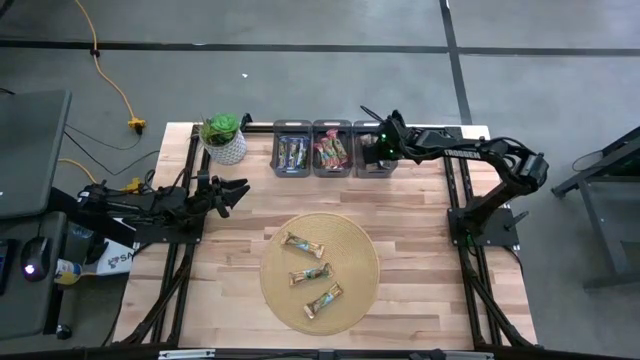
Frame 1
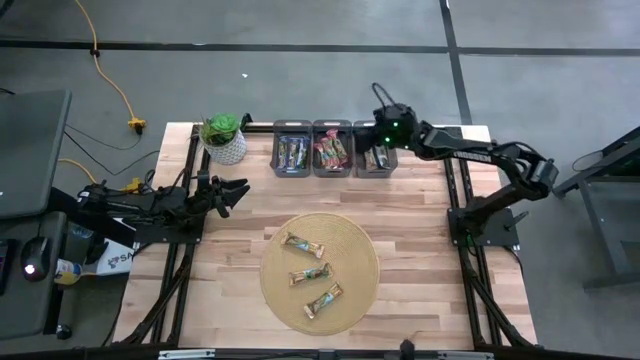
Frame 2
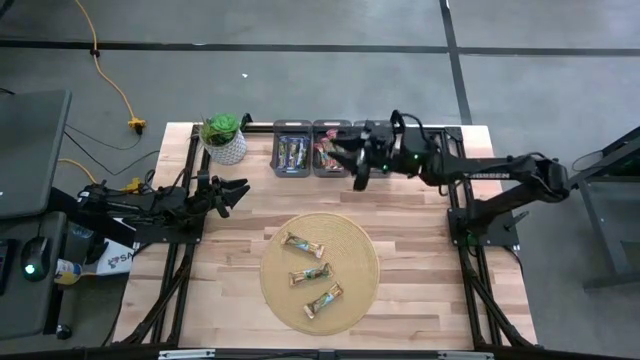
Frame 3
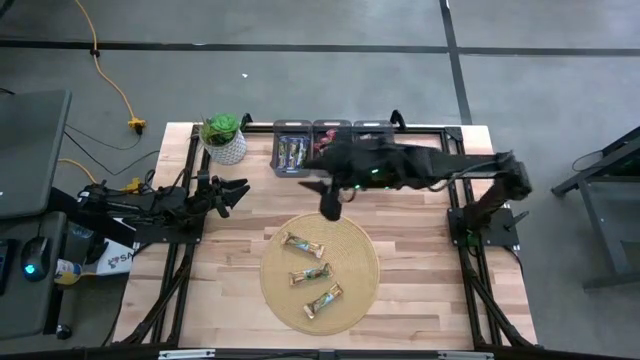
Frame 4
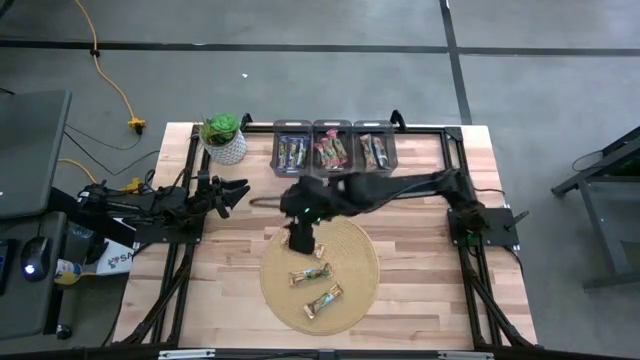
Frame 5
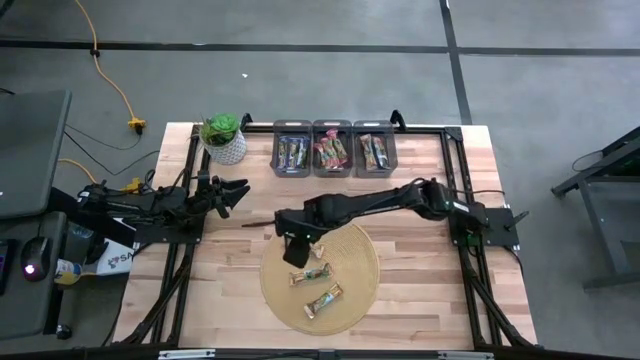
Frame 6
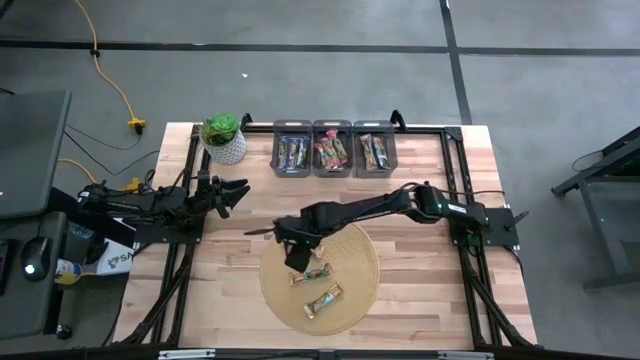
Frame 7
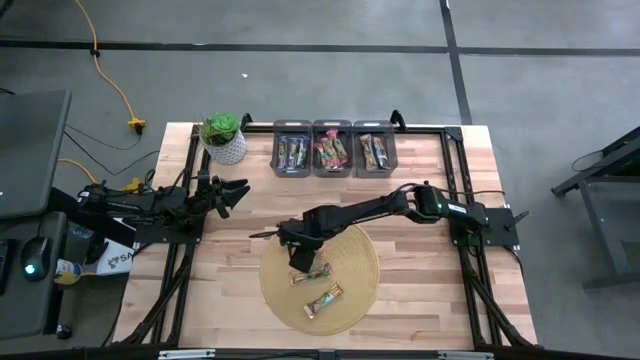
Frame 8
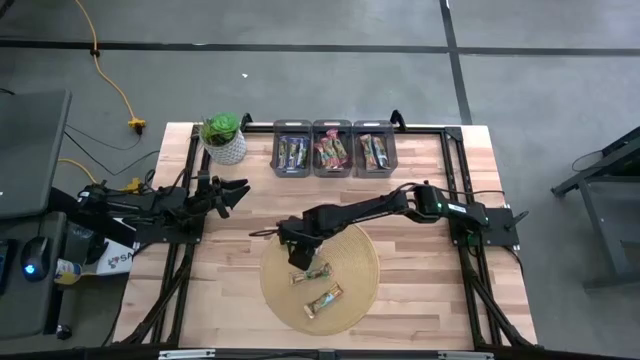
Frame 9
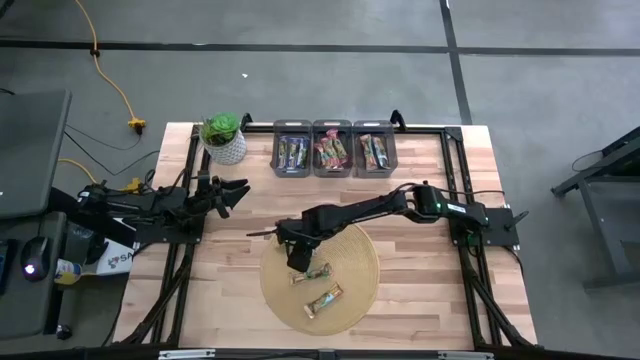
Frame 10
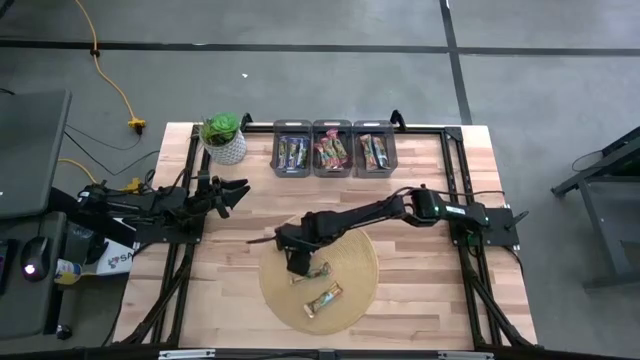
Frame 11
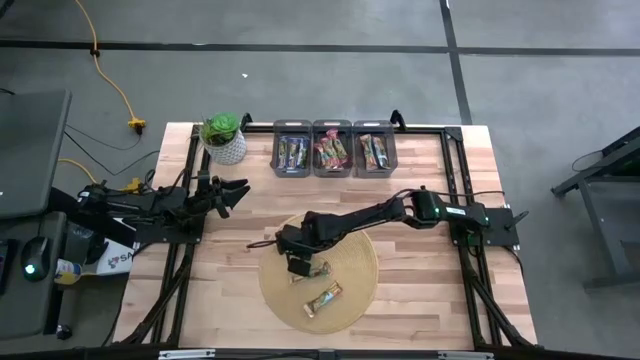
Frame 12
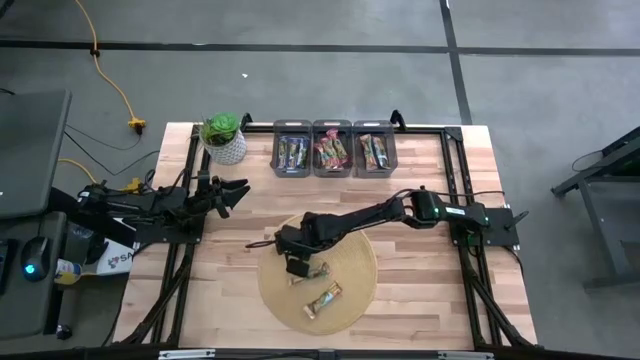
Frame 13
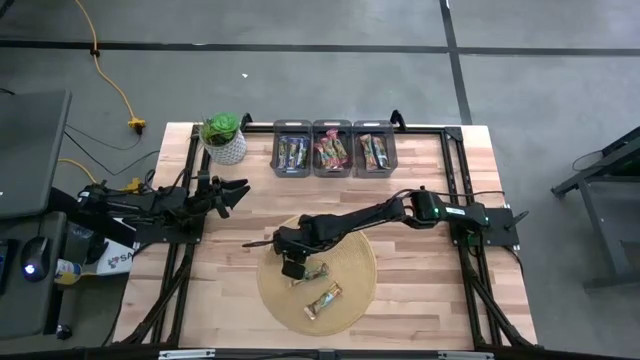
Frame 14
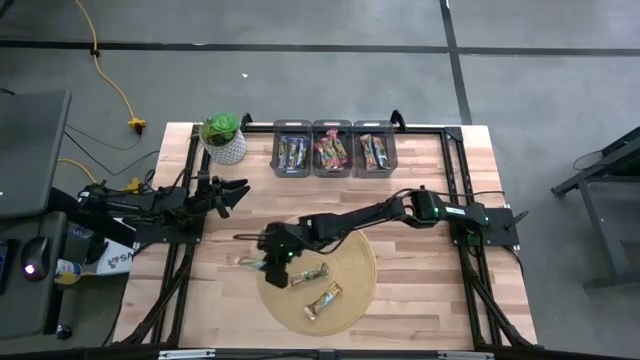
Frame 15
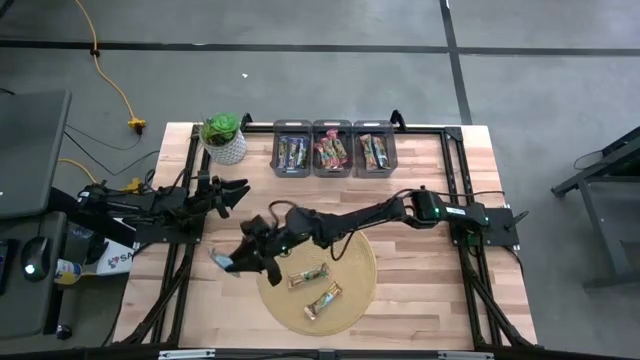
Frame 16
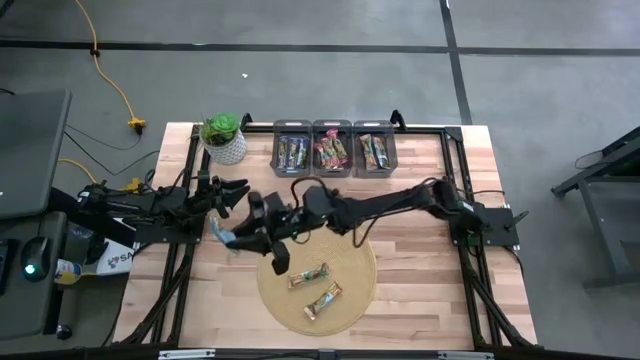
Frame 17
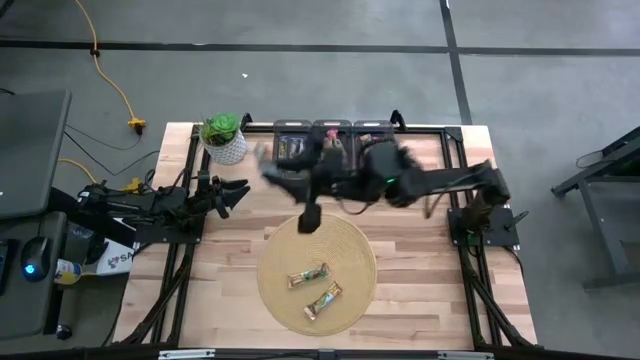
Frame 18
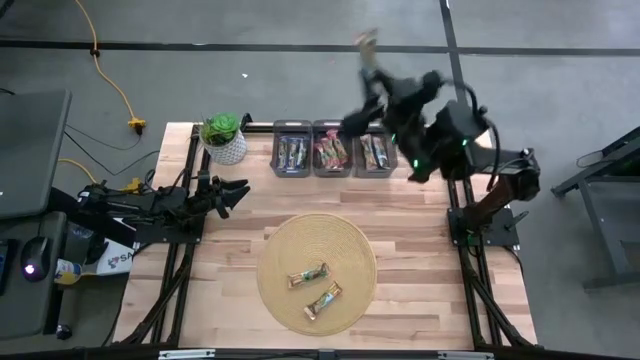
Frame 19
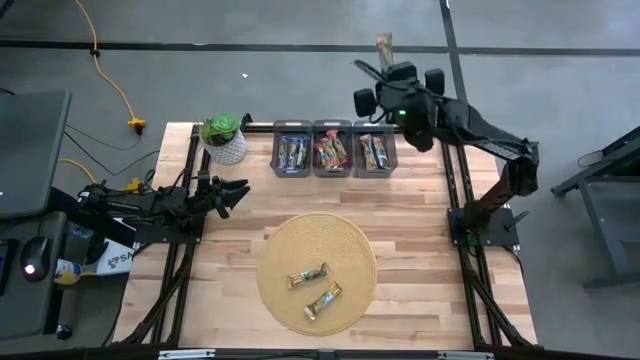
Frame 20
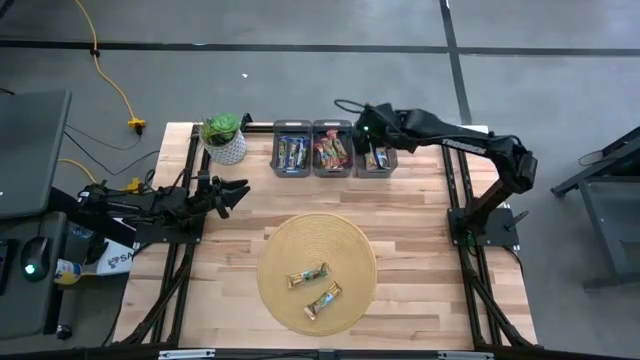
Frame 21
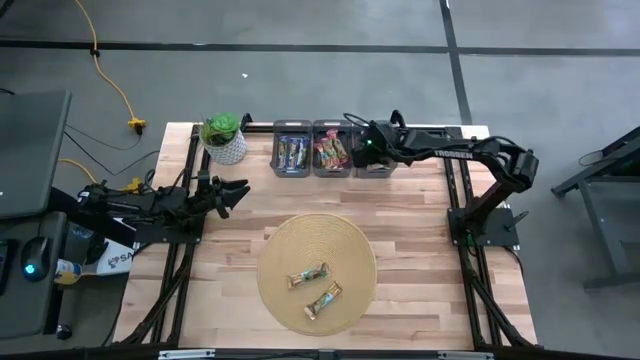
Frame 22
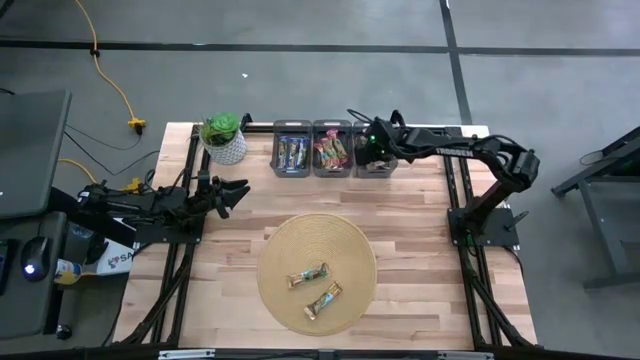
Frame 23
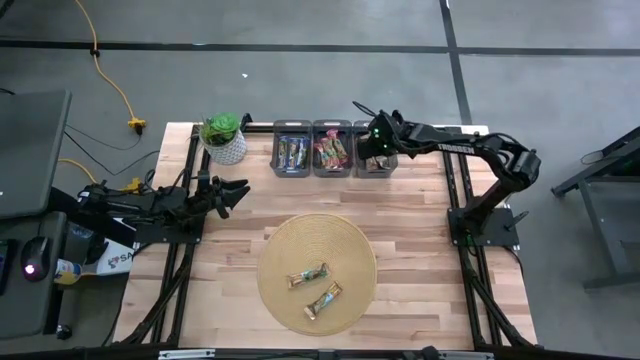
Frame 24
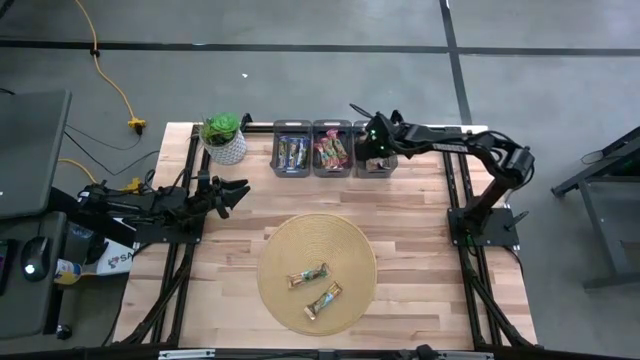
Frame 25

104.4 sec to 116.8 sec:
Task: Pick and place Granola Bars by type
Put the yellow granola bar into the right black bin

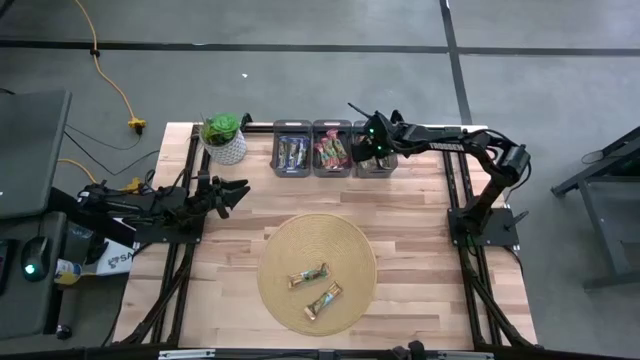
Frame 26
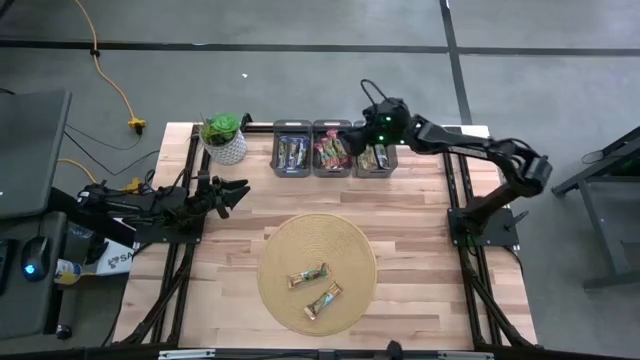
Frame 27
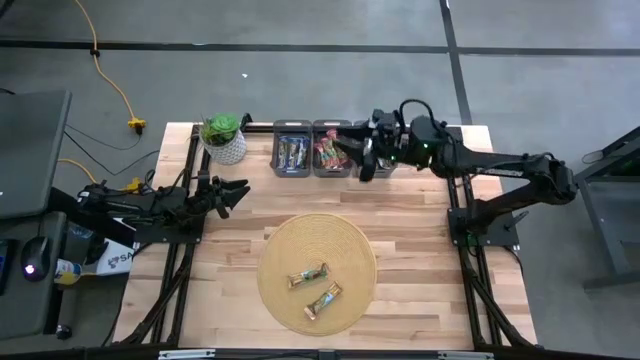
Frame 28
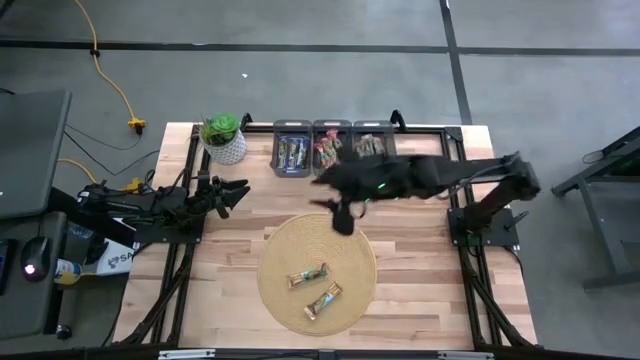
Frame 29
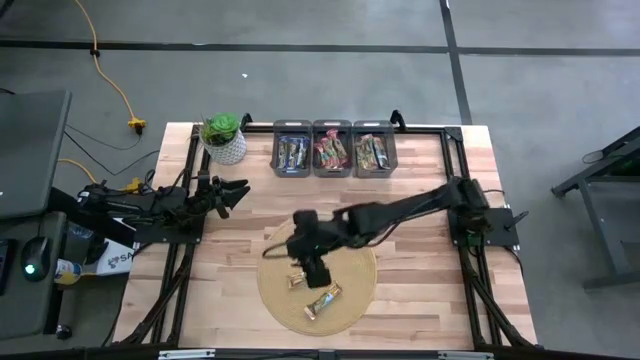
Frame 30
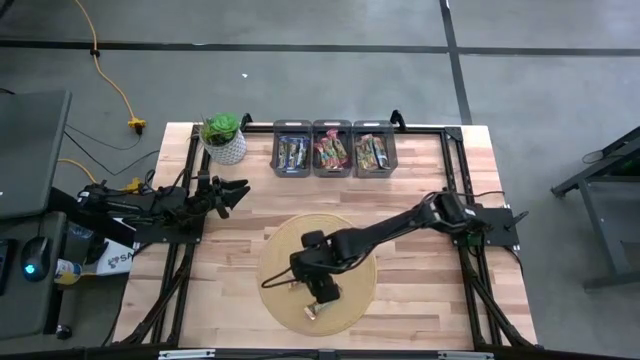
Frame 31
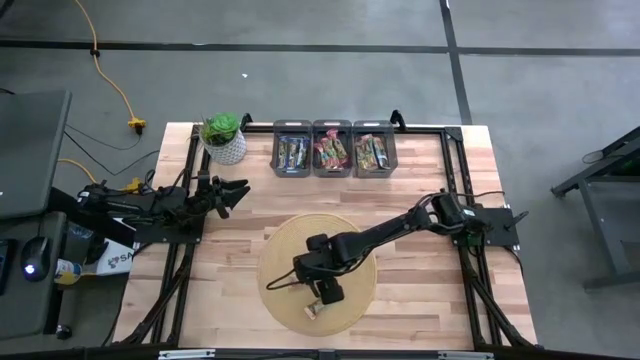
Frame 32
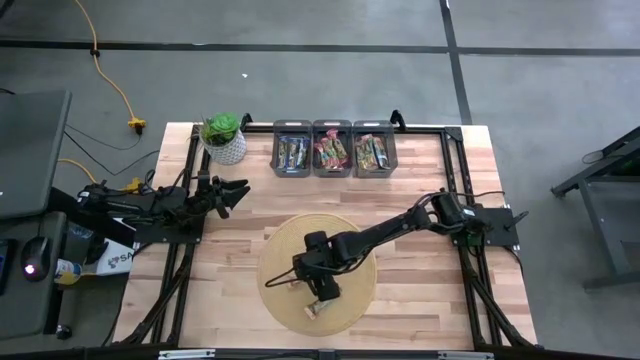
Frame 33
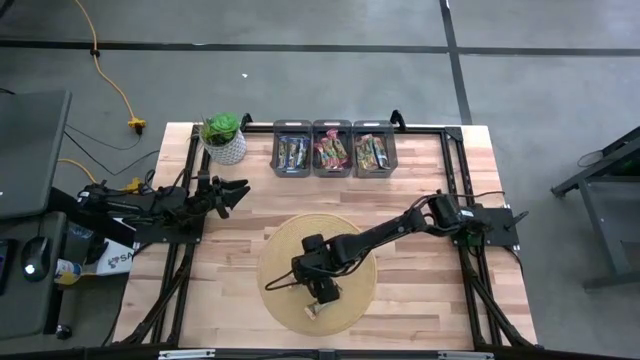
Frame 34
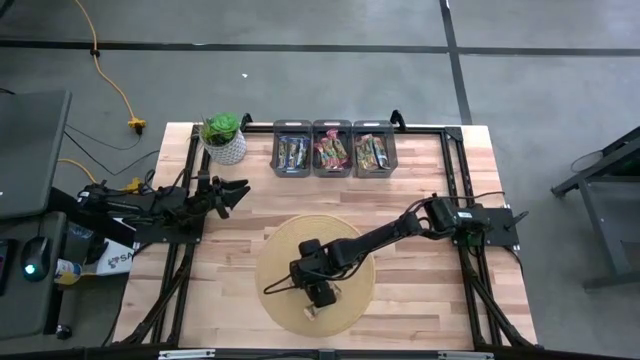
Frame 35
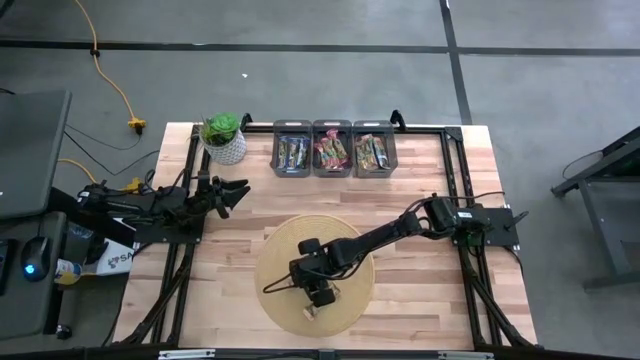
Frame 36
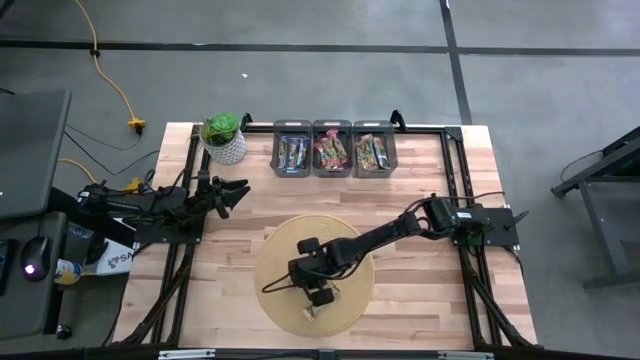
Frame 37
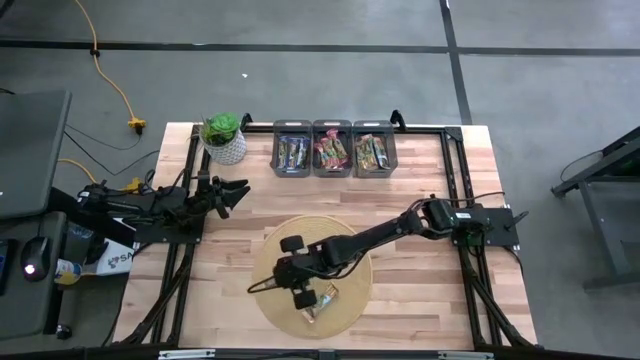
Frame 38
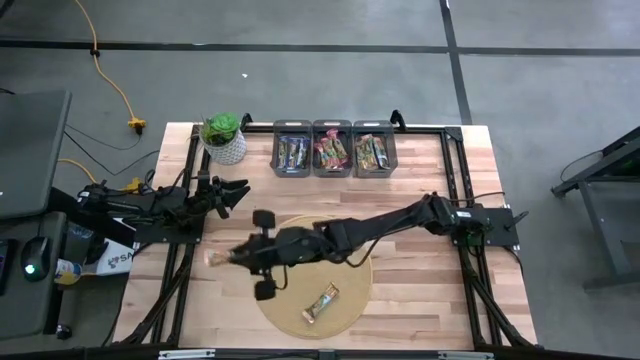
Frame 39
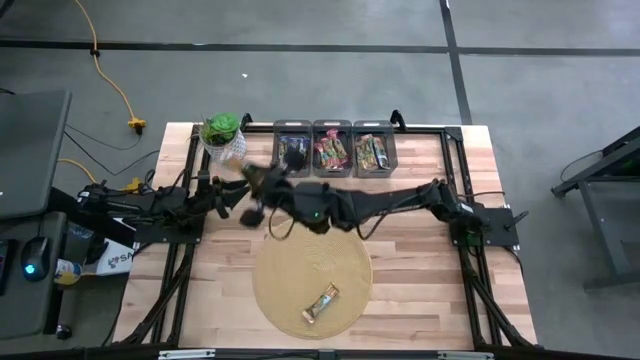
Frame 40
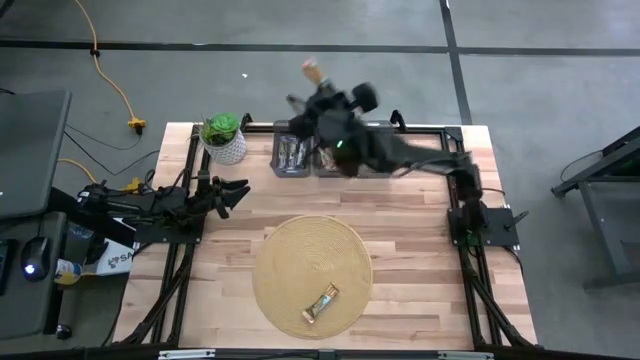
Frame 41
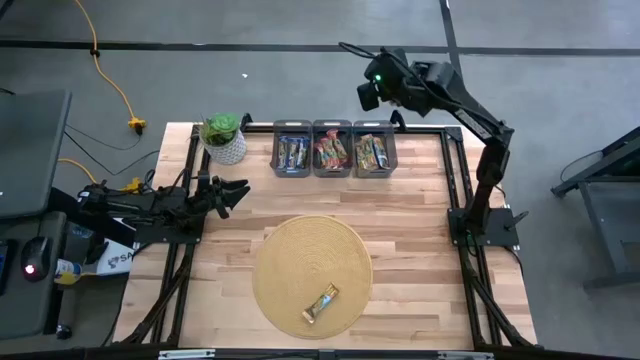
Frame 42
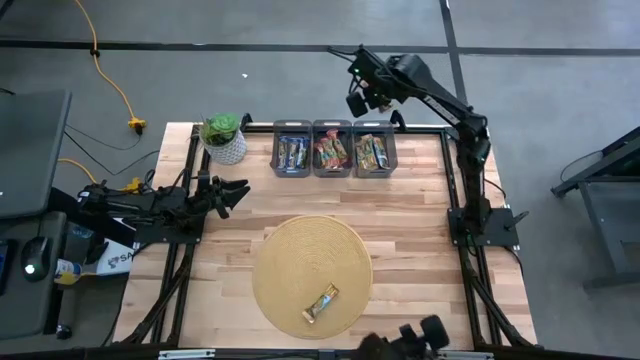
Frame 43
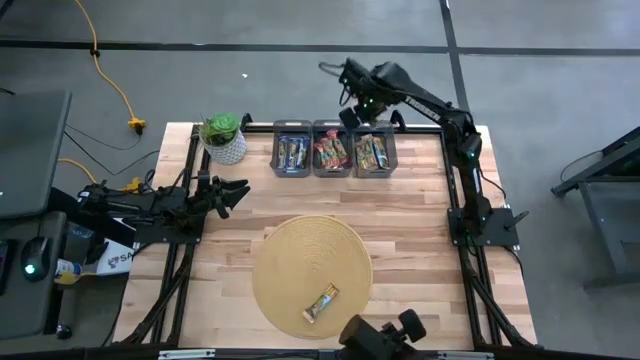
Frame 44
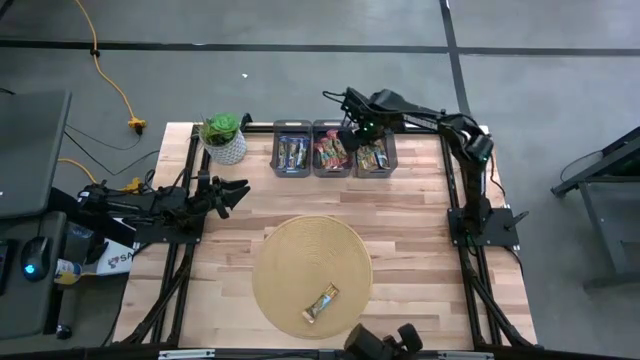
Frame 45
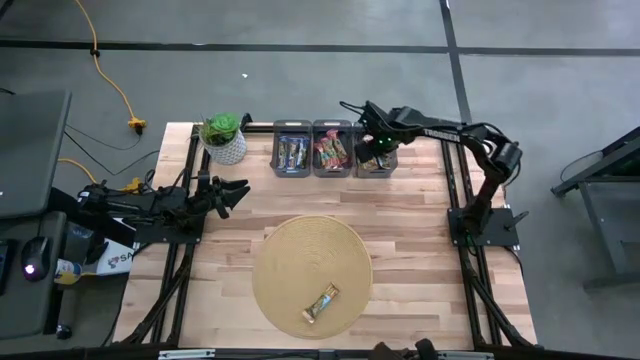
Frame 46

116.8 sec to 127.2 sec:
Put the yellow granola bar into the right black bin
